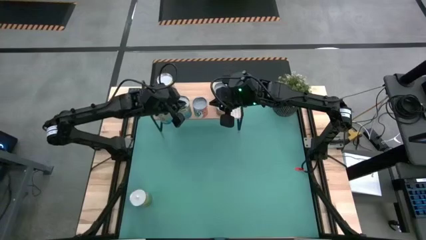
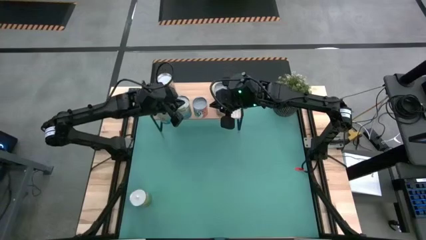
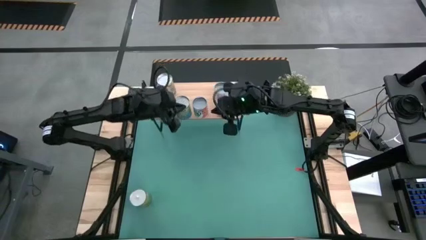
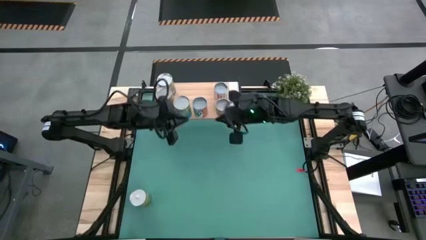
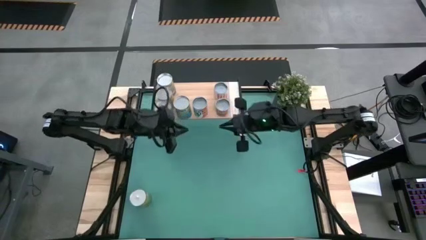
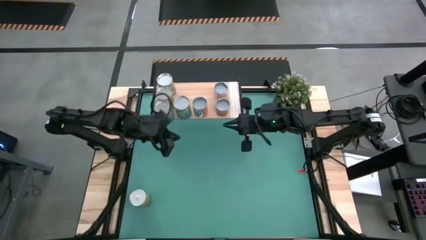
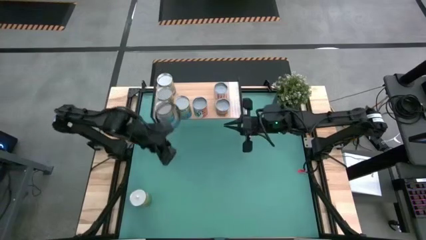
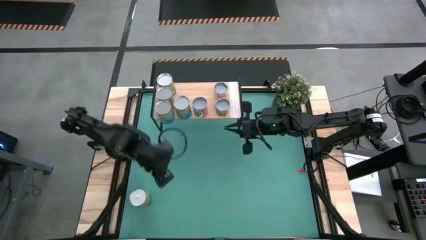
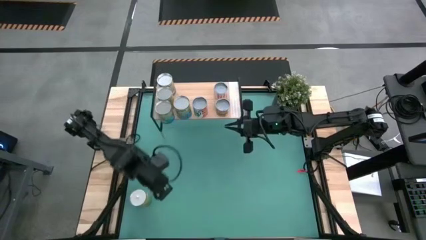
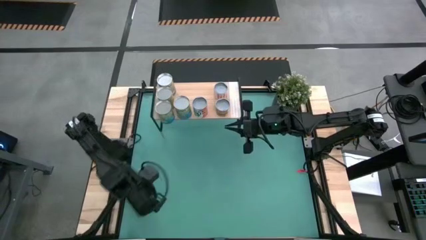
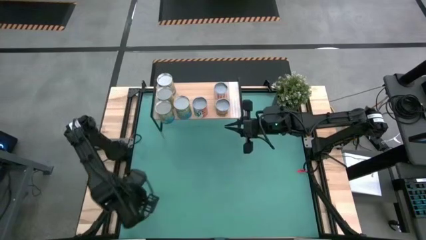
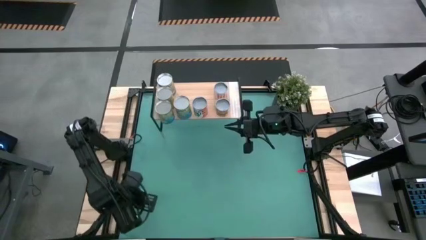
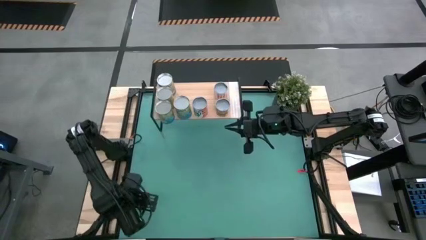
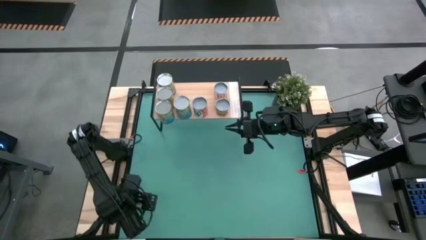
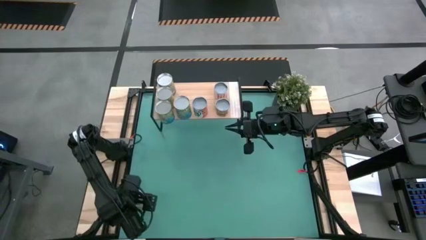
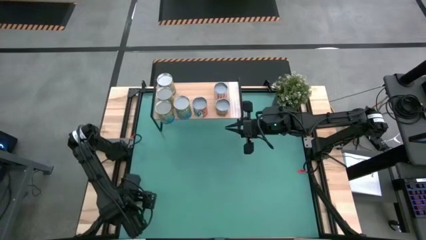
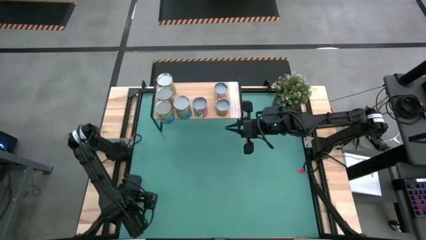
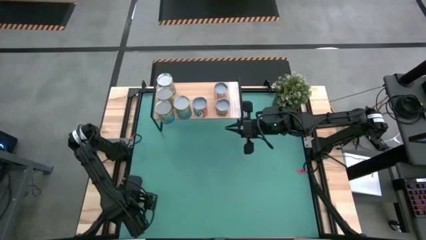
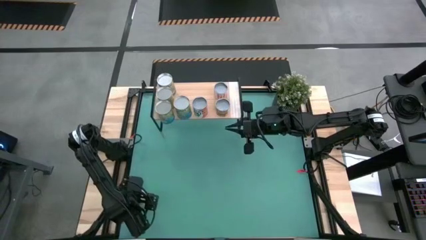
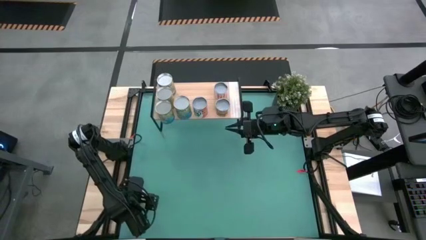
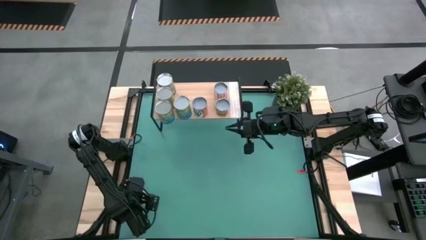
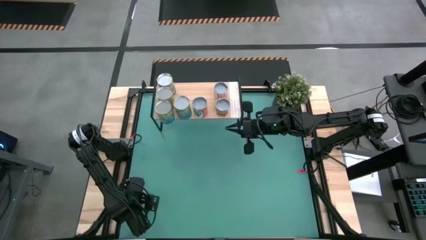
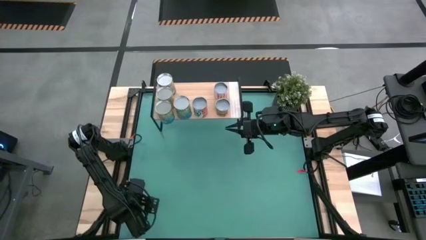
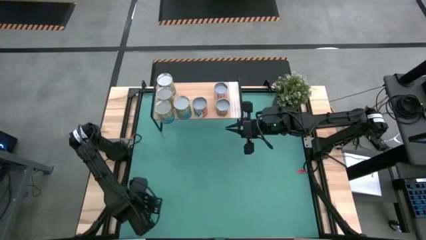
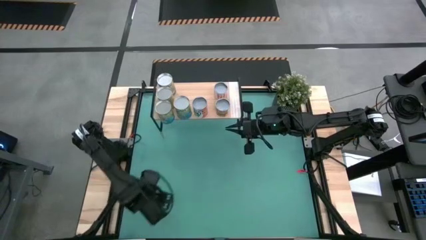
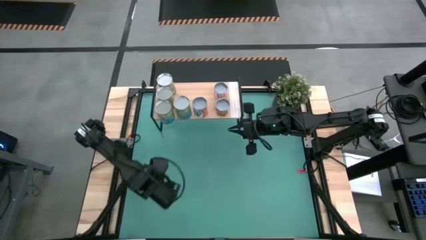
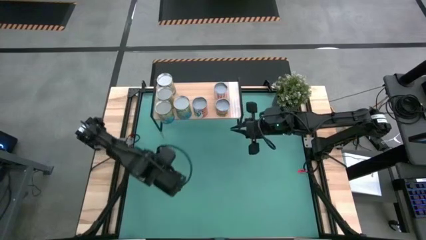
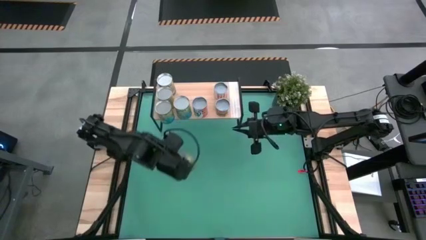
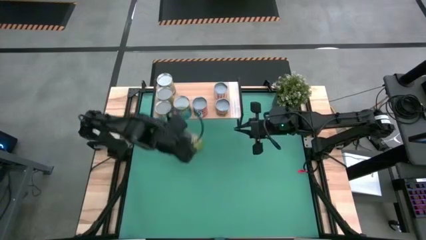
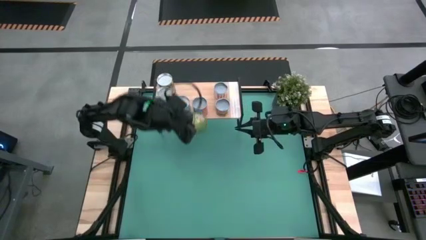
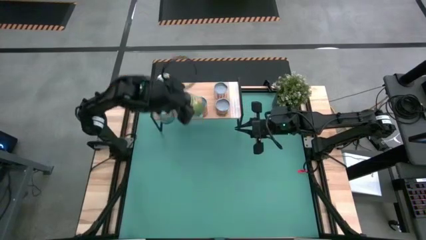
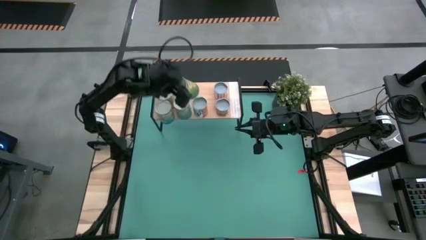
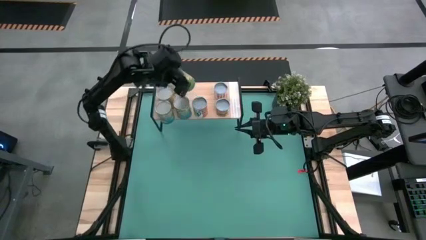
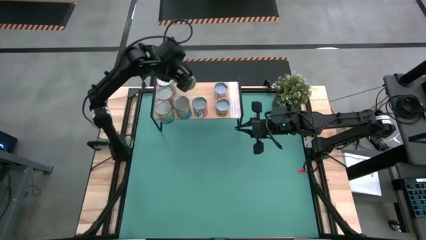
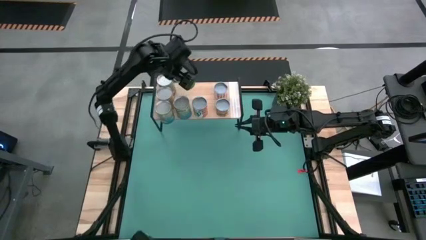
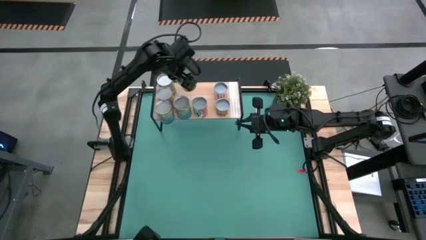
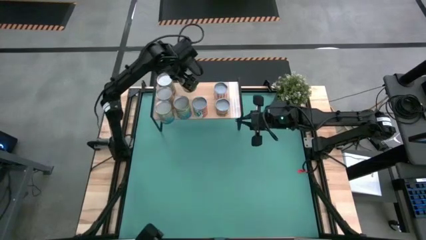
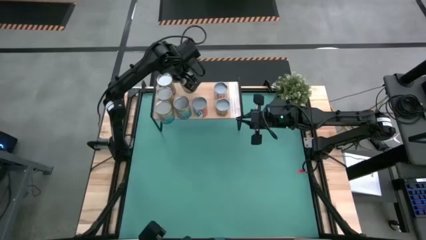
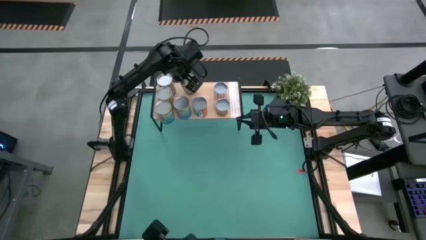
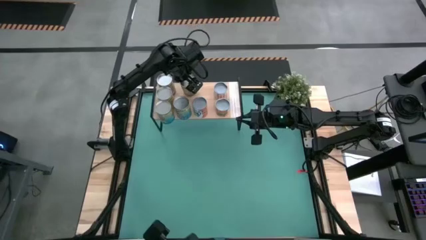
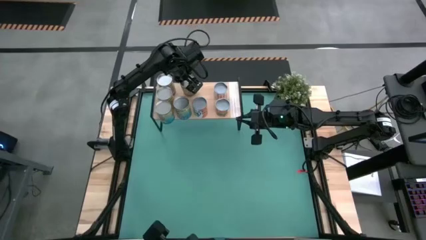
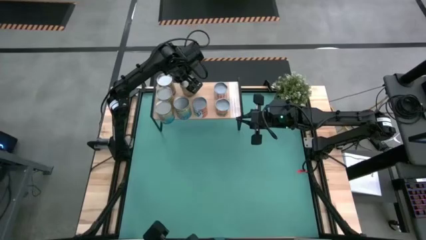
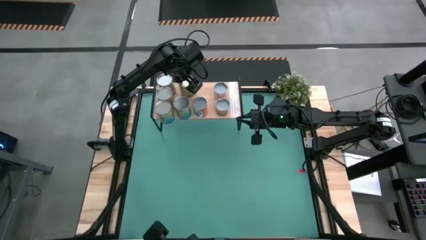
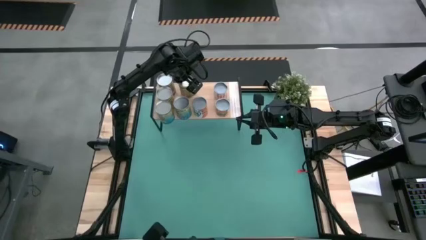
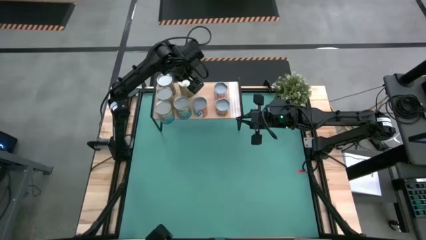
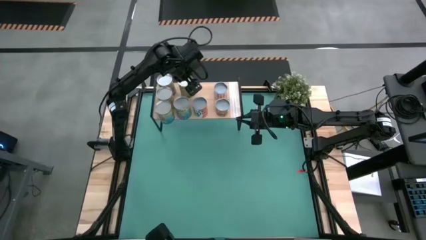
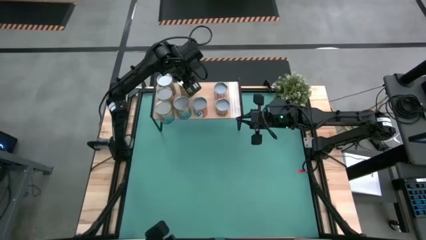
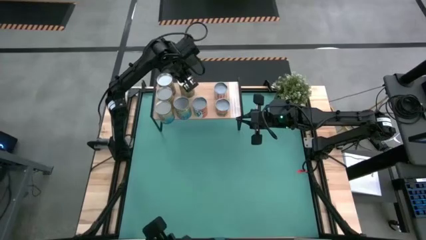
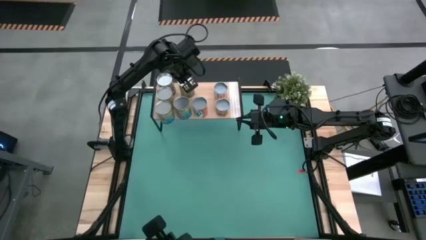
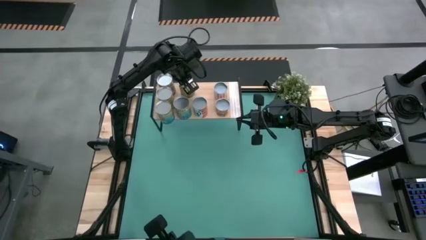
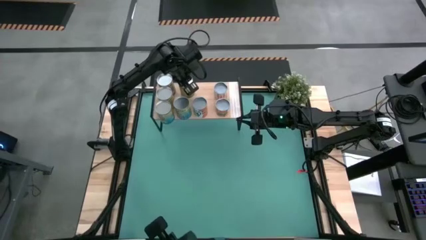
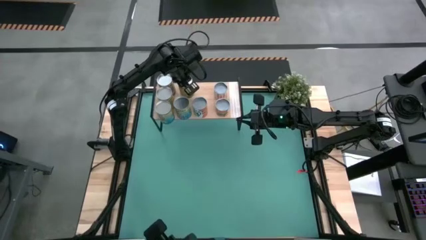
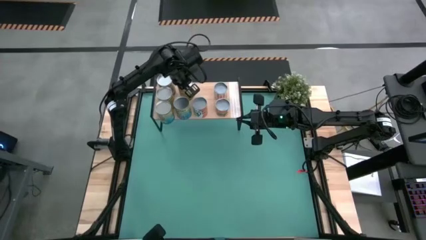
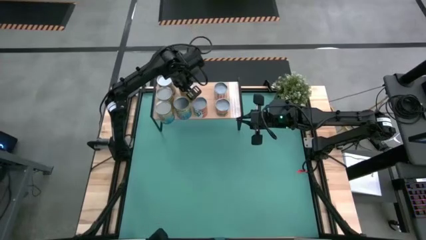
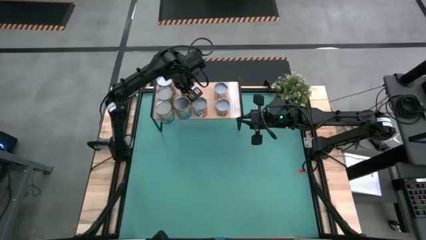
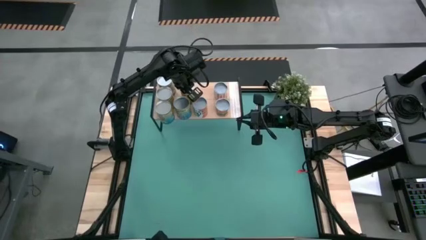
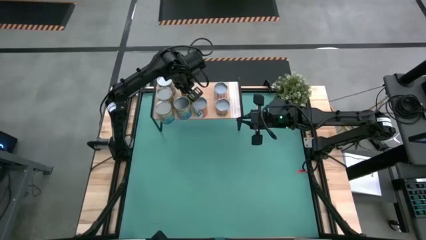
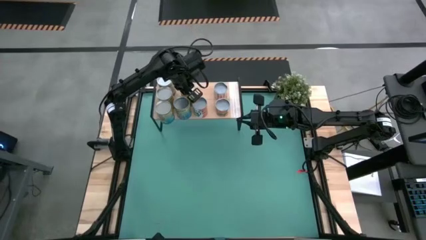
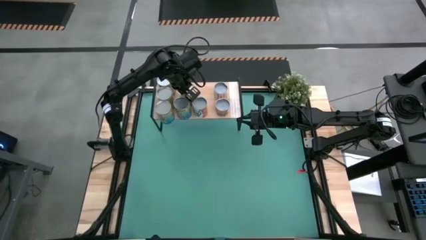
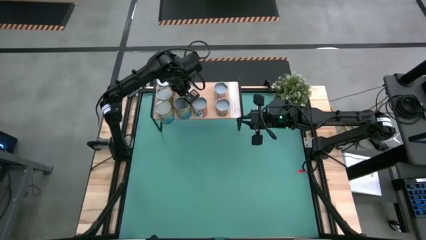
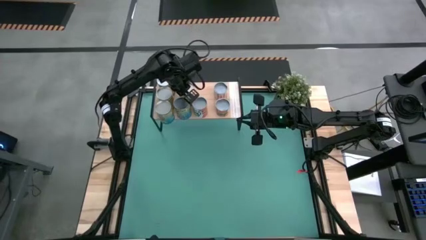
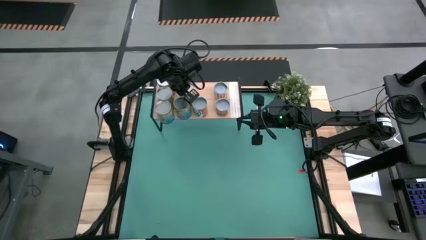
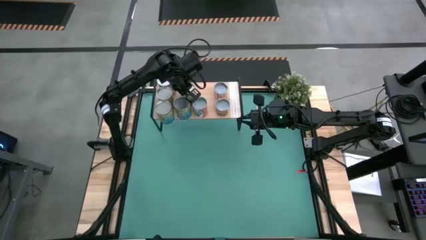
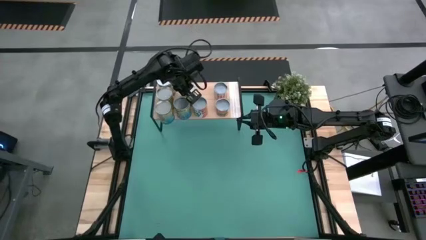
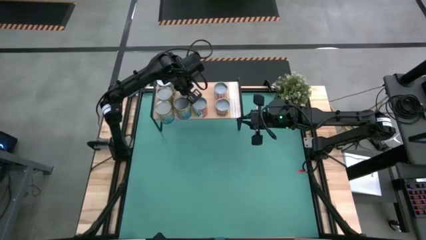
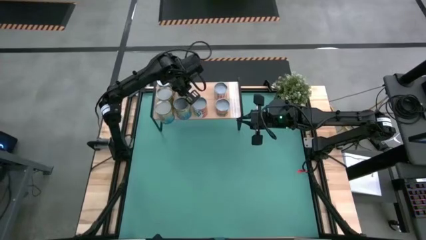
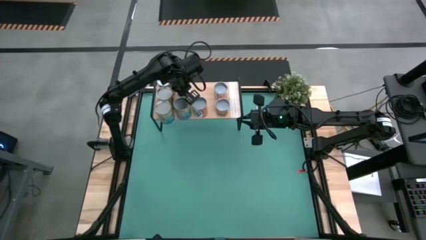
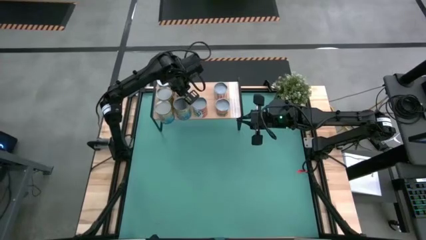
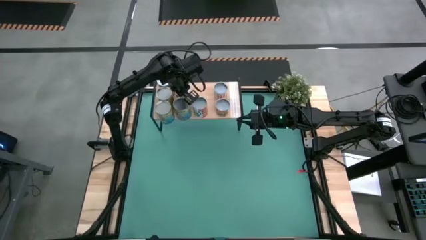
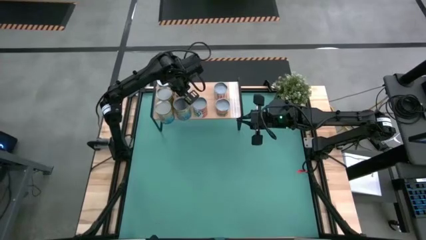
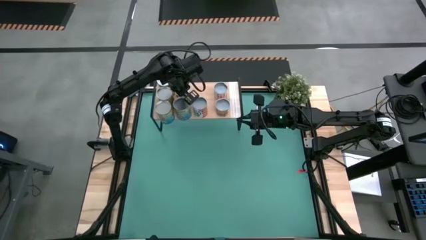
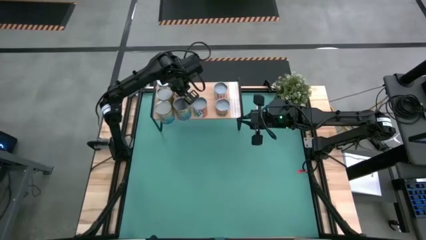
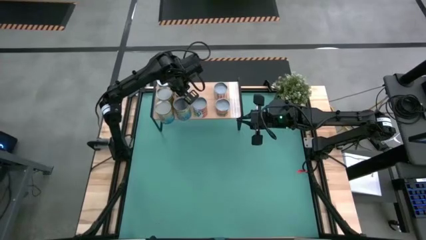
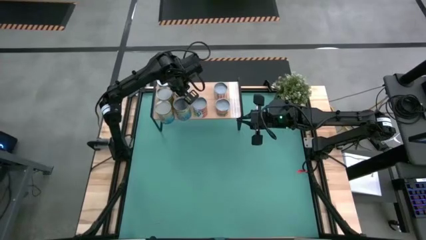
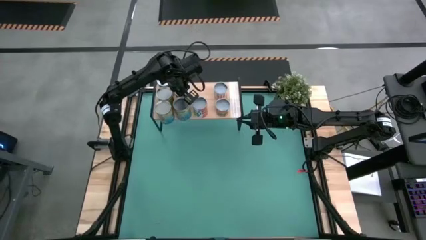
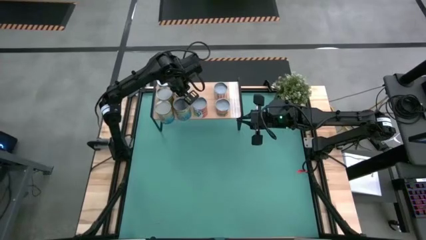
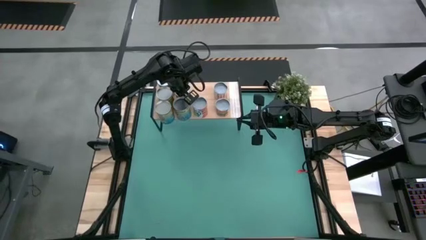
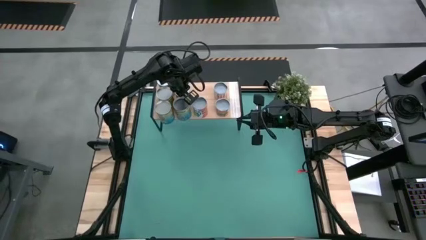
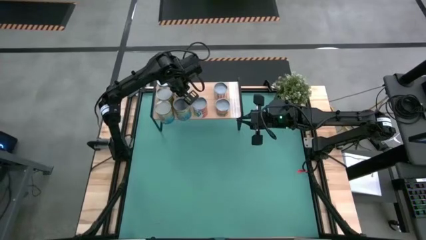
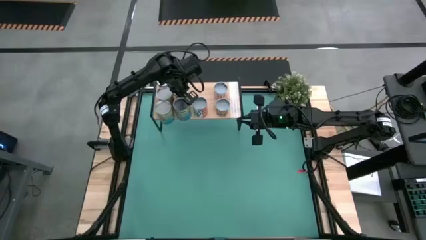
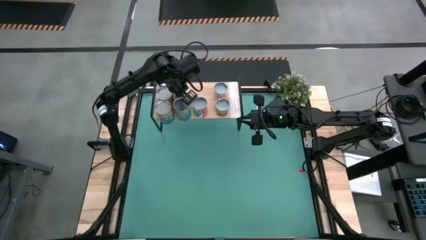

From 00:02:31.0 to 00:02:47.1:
Task: Pick and place cans onto a shelf
Put the big canned oranges on the shelf

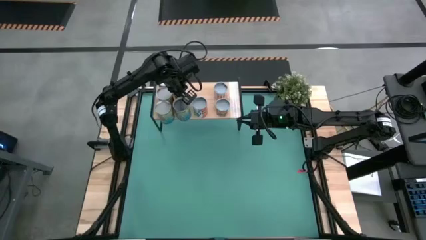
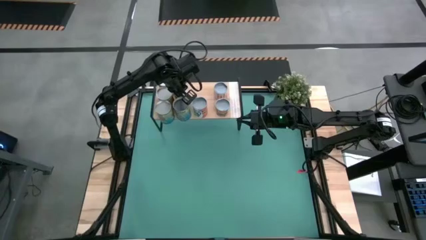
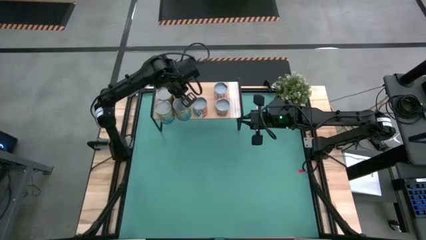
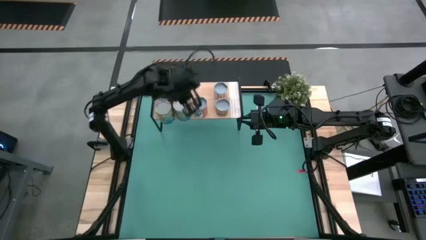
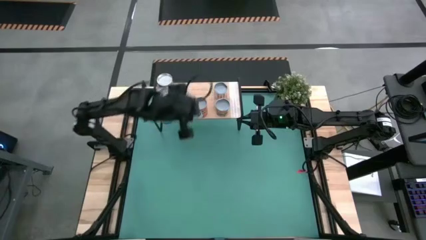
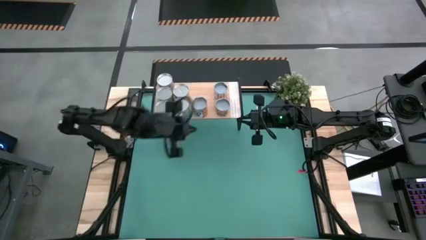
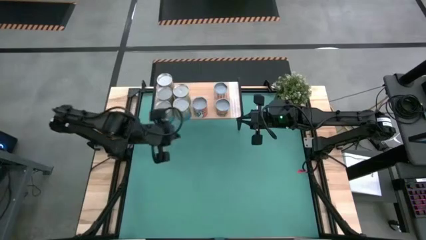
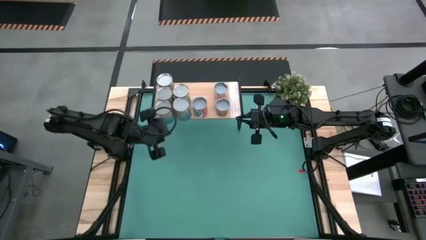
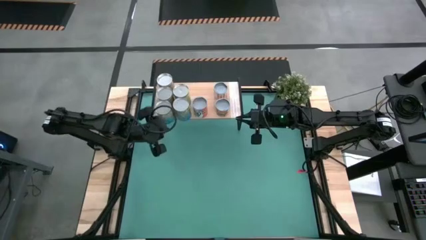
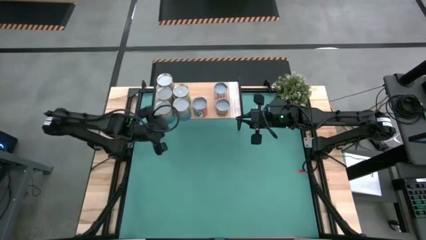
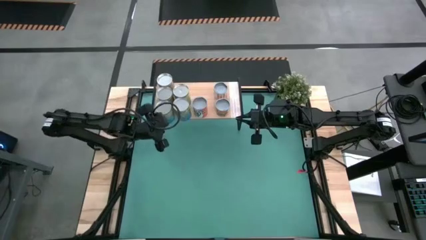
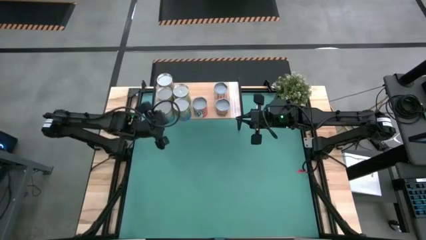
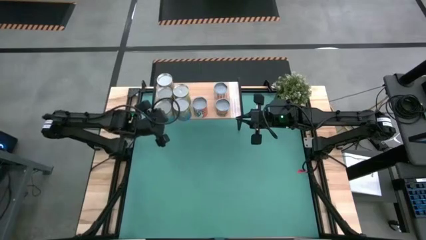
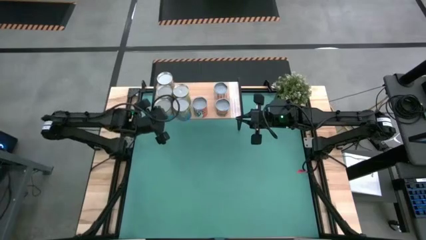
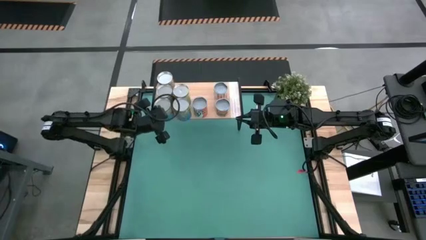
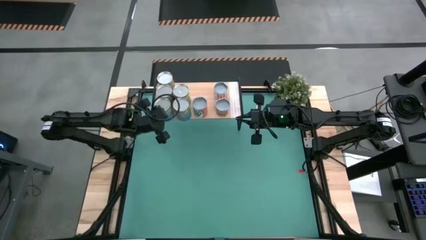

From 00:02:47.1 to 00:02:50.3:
Adjust the canned goods on the shelf
